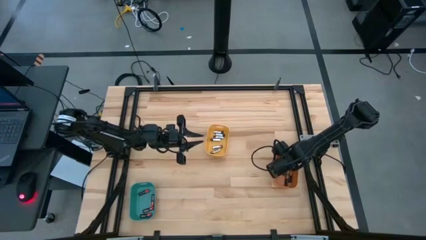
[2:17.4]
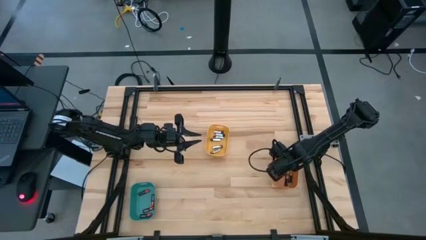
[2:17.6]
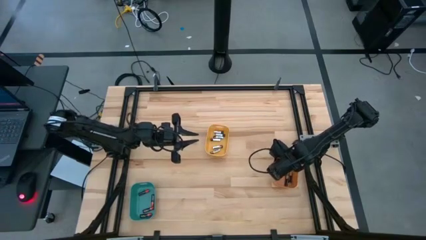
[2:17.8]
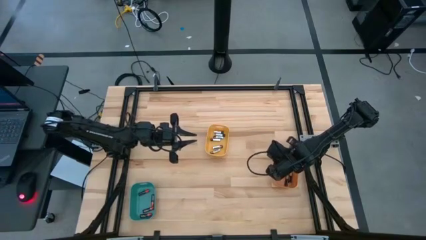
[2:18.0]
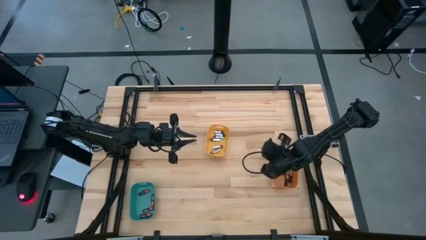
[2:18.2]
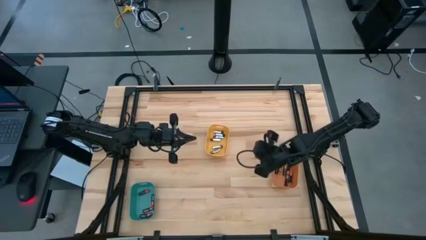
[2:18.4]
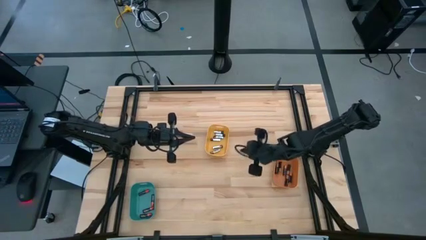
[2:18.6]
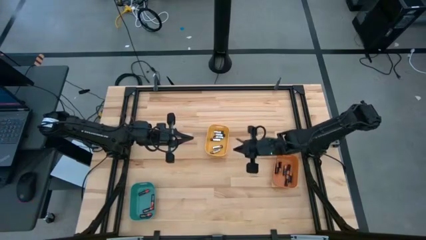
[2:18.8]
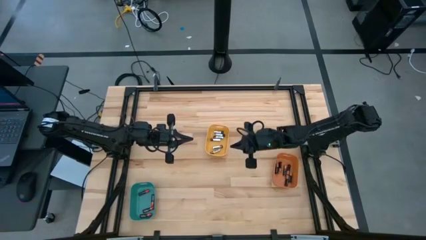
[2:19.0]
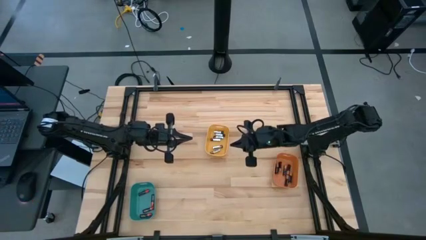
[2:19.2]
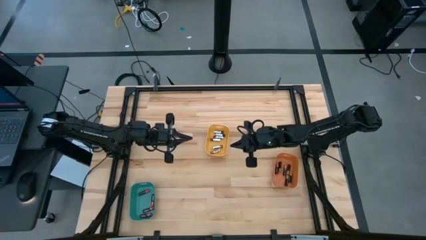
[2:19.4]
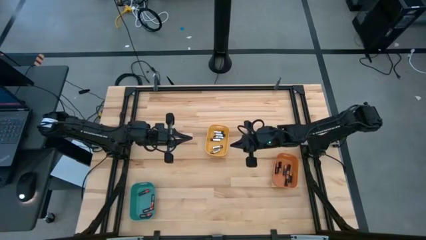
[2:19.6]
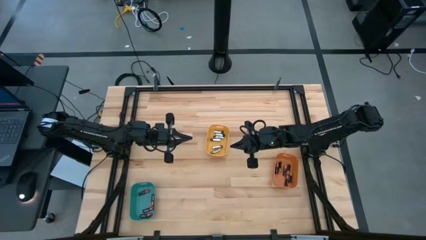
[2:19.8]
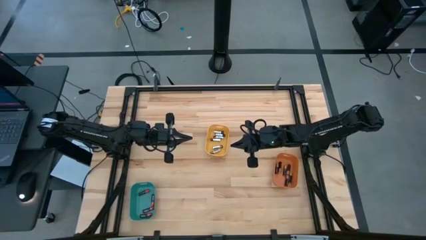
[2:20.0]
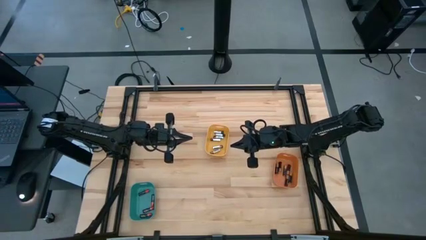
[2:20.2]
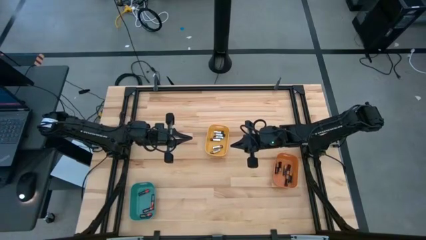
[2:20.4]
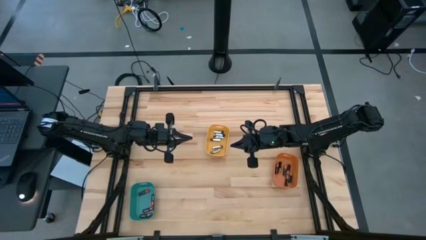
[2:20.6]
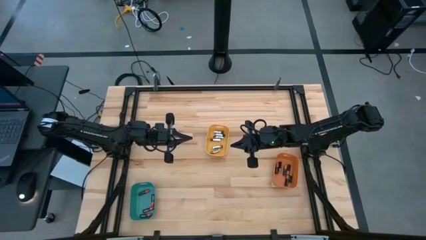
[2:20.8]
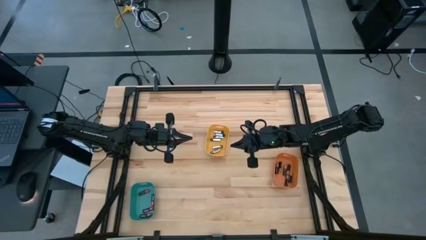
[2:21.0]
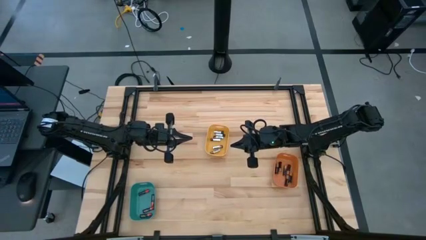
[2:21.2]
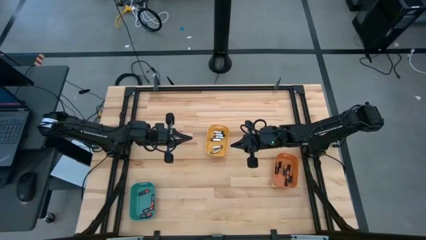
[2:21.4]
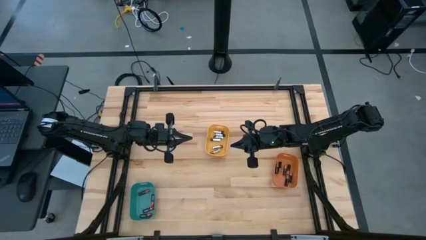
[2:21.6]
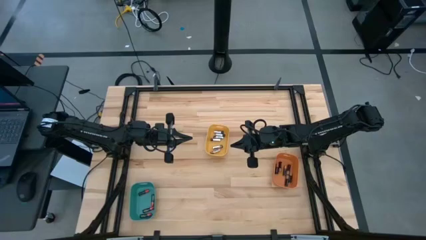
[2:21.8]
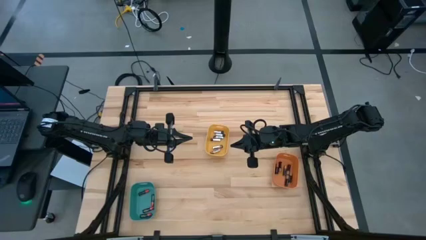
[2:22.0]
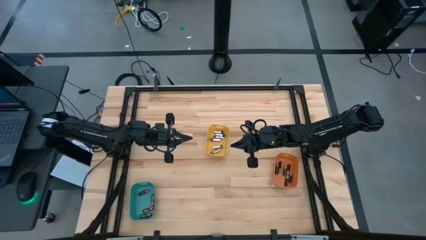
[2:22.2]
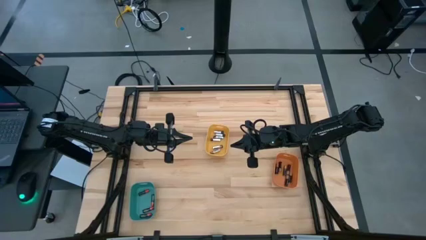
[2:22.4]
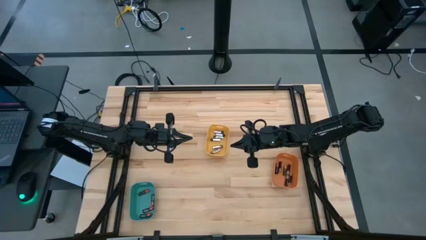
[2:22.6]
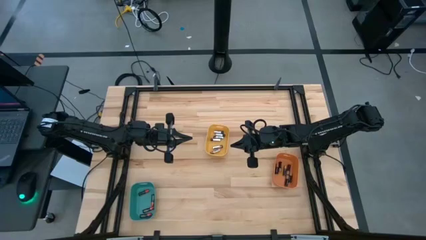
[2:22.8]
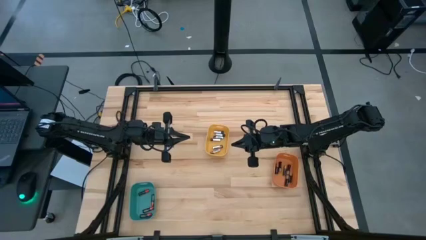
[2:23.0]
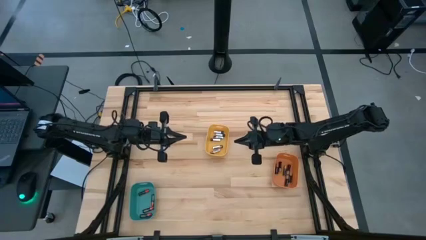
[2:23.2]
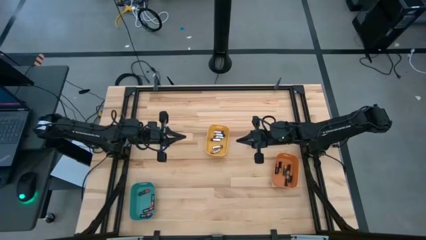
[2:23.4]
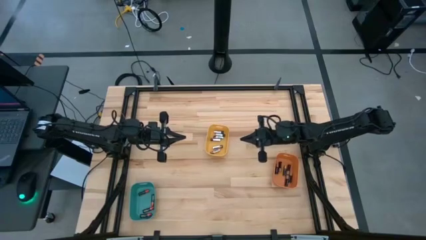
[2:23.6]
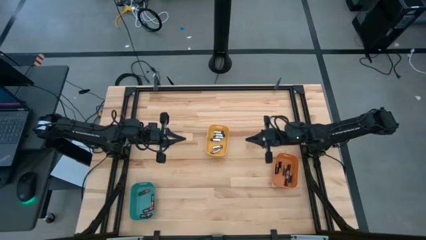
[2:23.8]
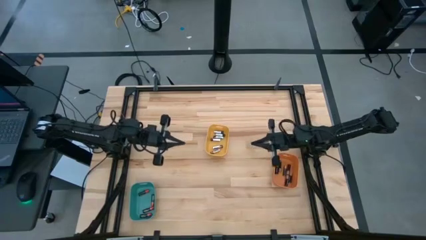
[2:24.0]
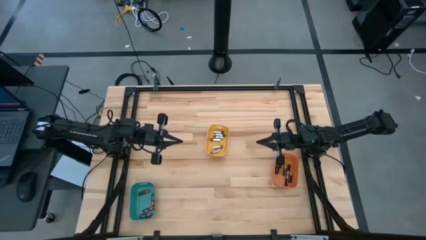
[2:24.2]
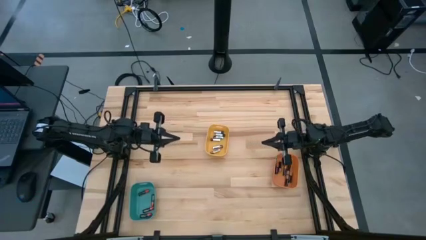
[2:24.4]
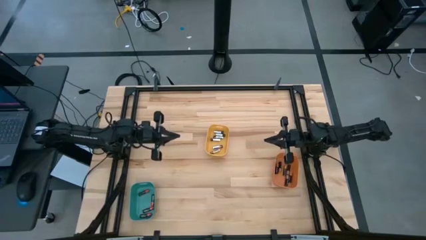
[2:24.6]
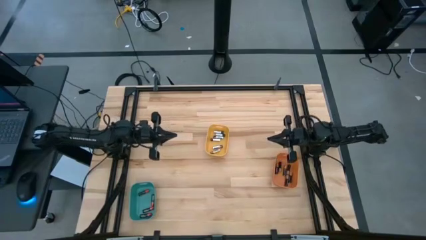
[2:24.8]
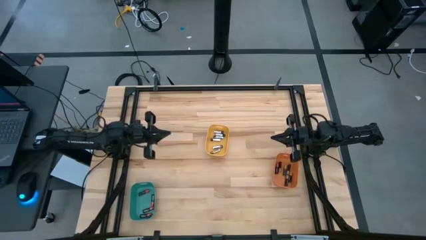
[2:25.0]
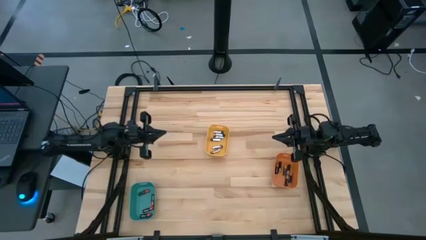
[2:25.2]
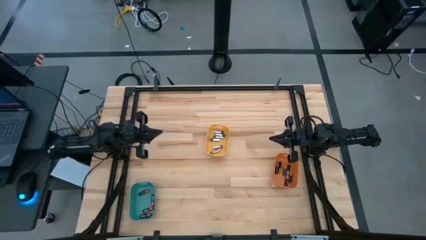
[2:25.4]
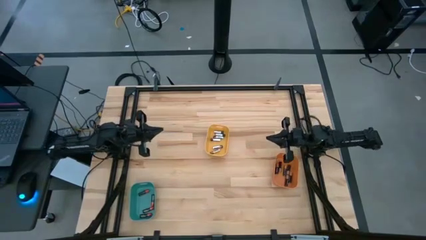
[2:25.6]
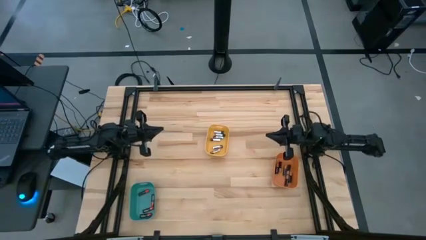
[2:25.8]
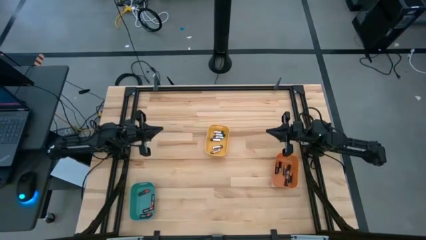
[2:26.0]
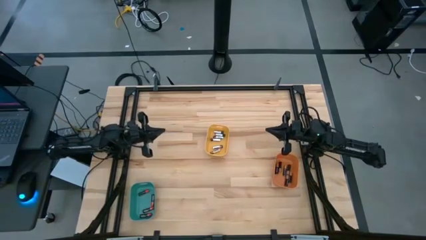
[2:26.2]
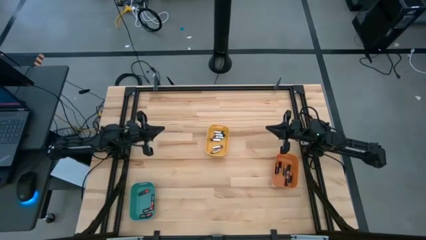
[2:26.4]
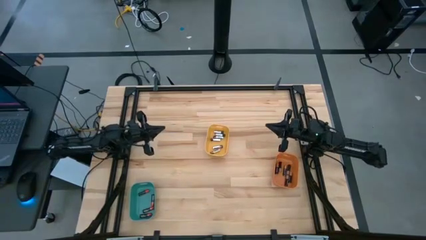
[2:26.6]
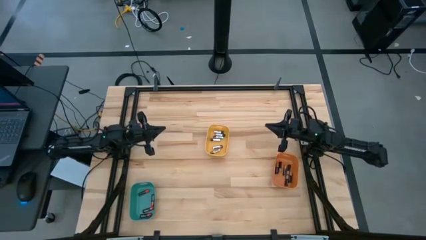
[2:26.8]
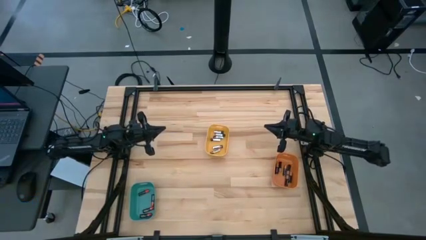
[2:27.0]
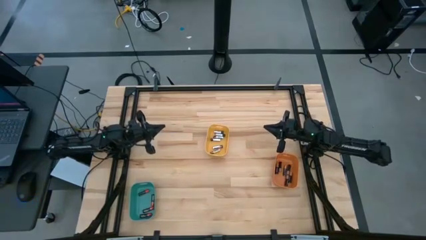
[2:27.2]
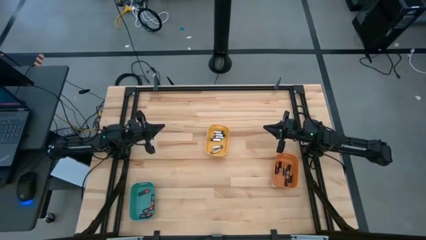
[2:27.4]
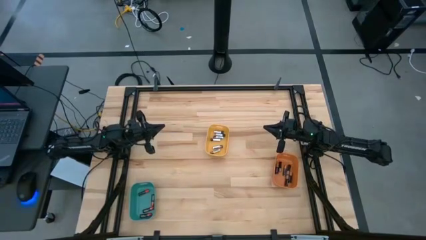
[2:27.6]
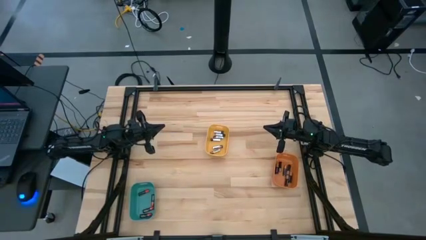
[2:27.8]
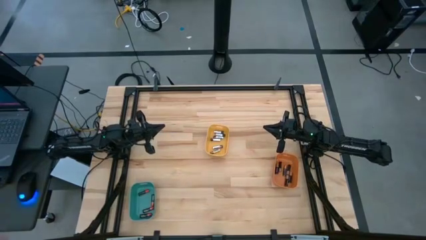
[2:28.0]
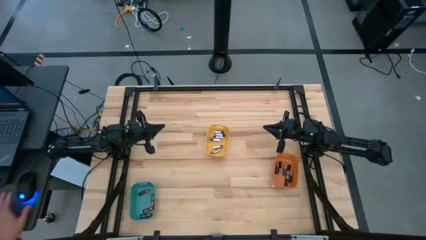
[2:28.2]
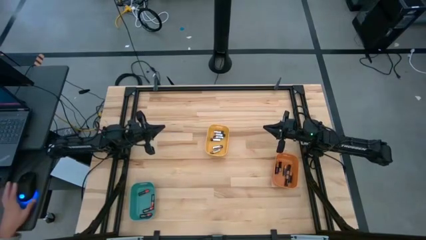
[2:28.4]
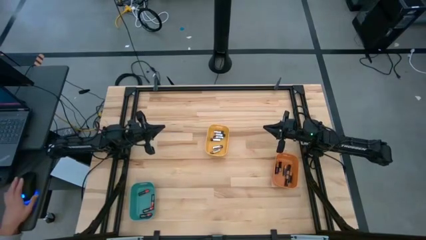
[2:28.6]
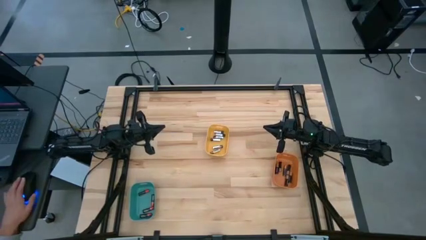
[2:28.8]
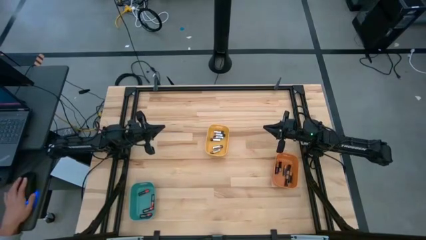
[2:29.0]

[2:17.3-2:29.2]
Task: Sort batteries
Return to Home Position

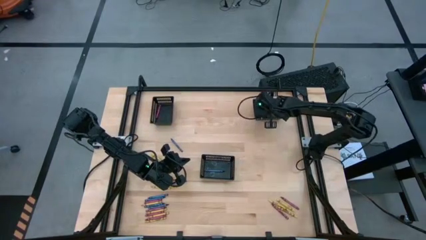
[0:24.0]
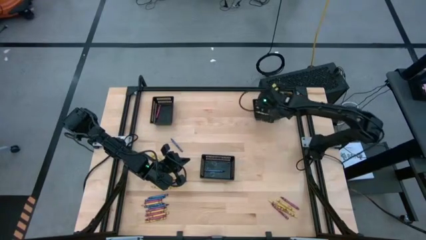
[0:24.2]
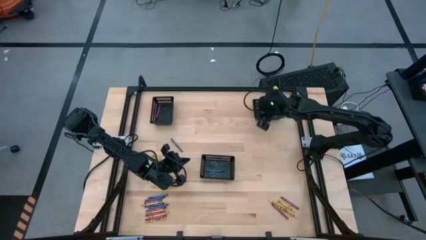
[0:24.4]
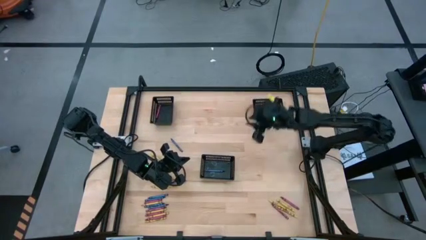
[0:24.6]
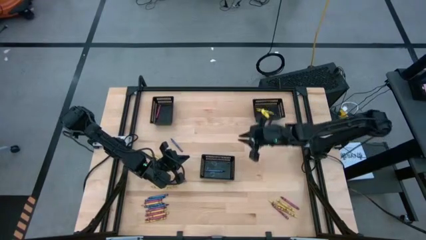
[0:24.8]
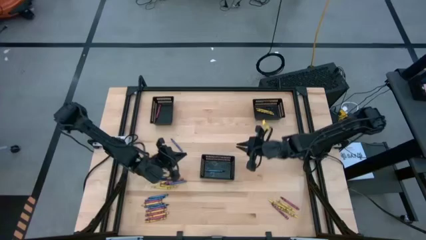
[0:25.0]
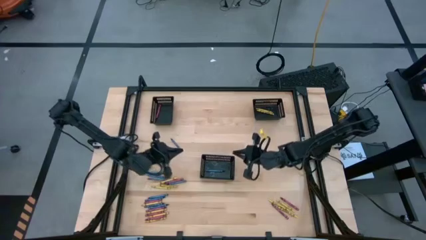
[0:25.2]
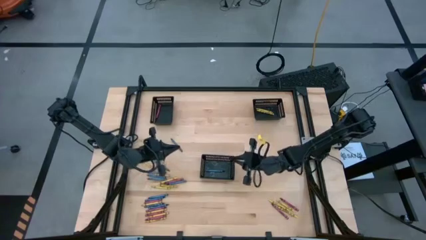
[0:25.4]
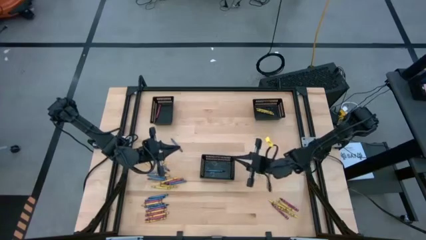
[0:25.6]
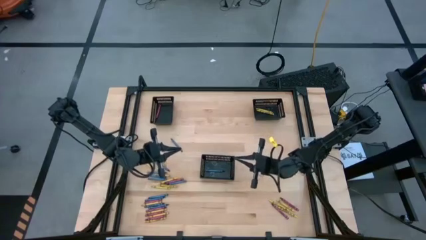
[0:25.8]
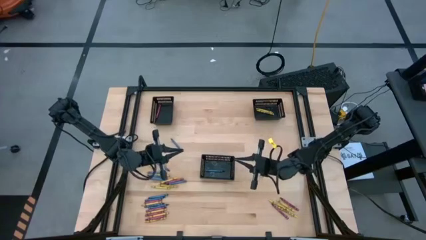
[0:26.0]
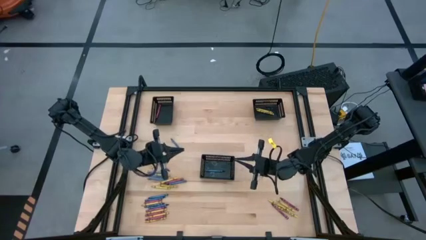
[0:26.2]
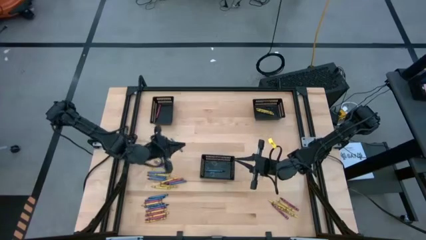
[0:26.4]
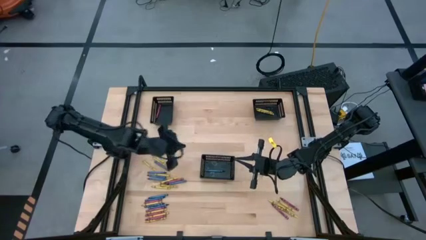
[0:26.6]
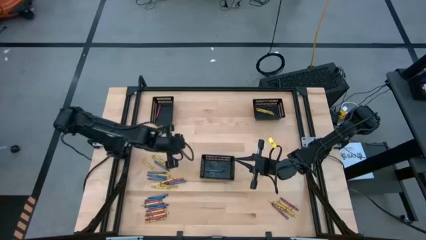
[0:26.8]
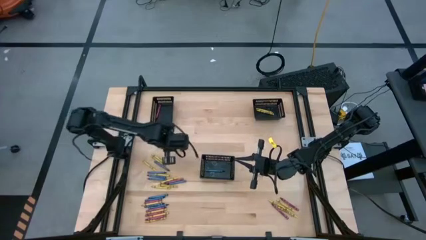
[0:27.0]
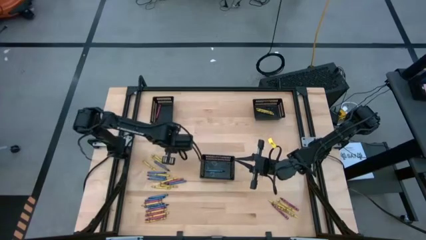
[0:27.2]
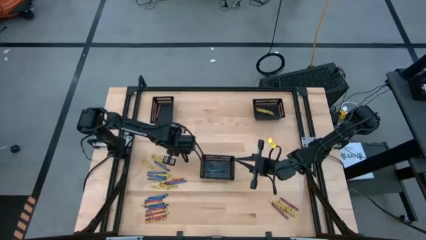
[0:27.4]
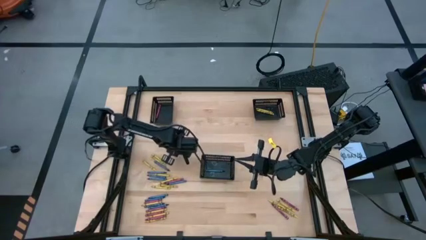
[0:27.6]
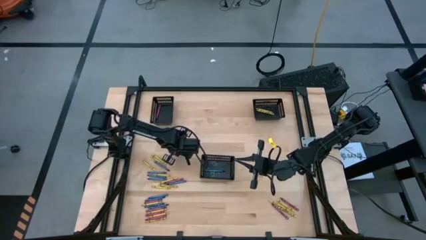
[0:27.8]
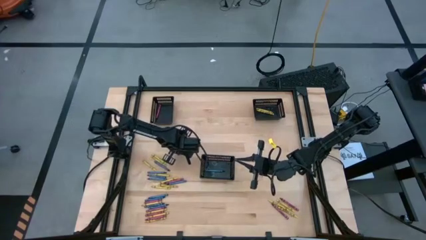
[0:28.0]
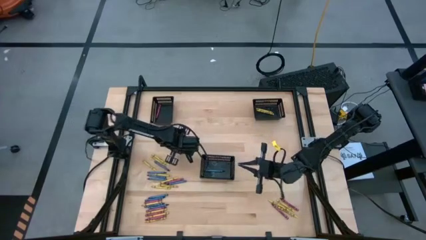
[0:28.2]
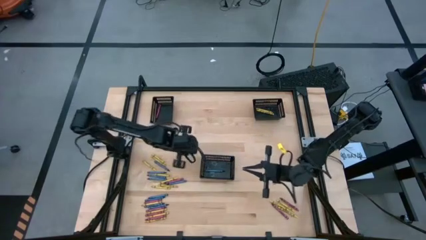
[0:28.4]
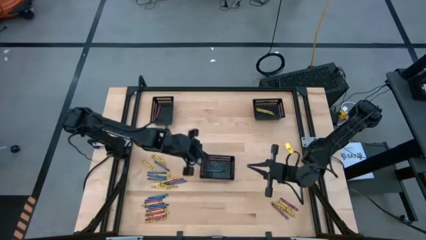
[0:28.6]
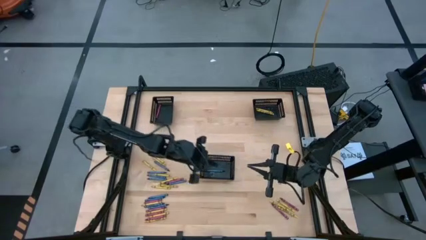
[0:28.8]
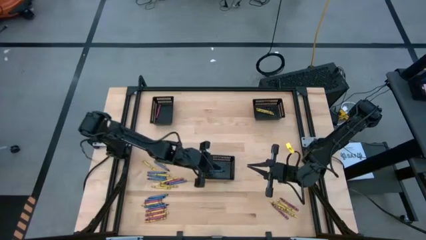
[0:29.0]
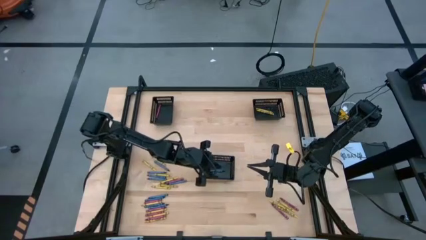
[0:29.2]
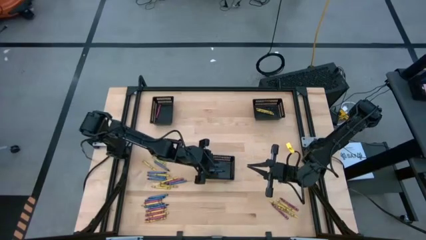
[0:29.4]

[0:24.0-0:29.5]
Task: Sort crayons
Put the blue crayon into the bottom black bin
